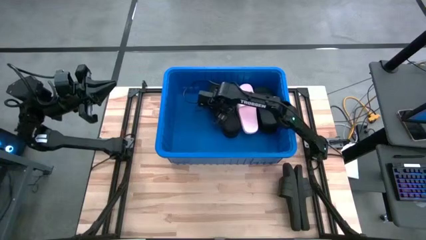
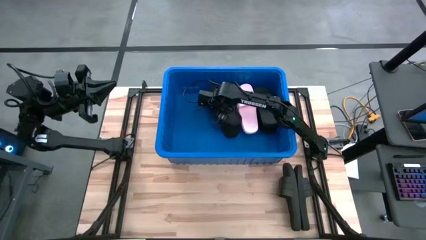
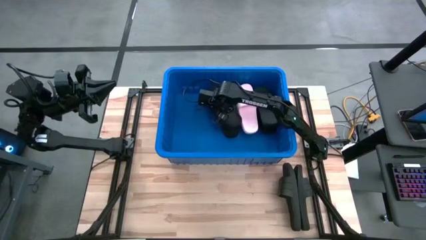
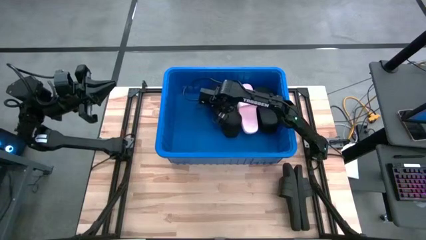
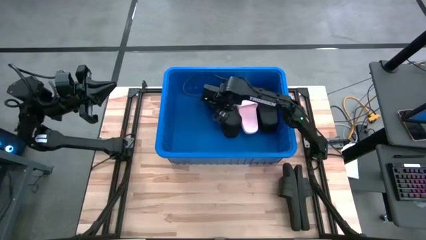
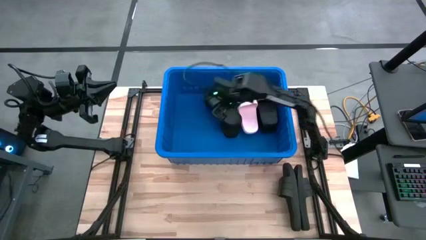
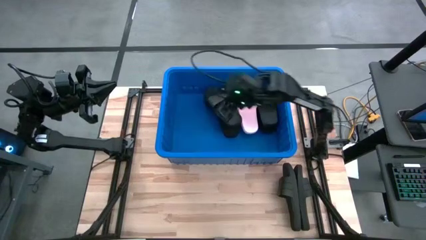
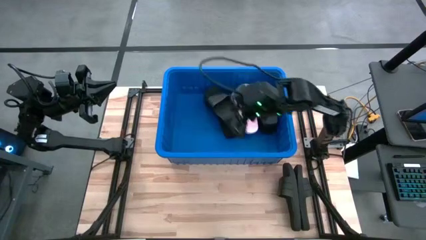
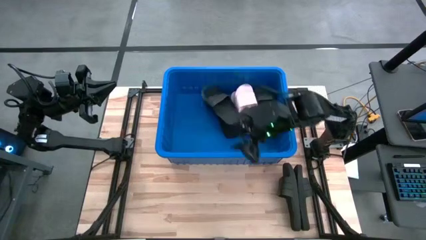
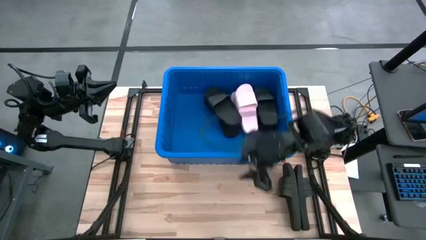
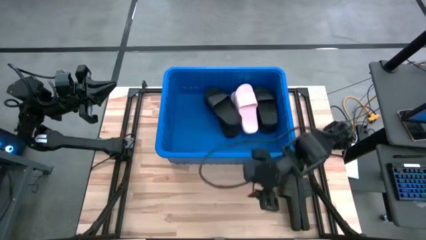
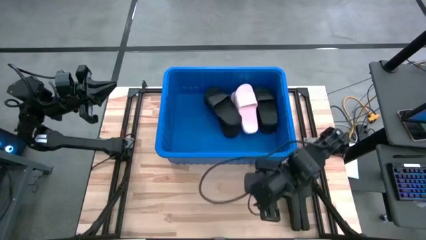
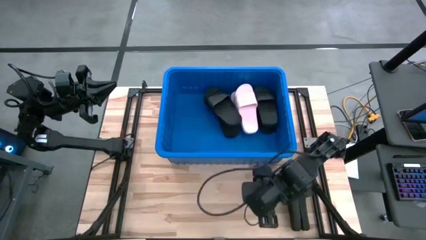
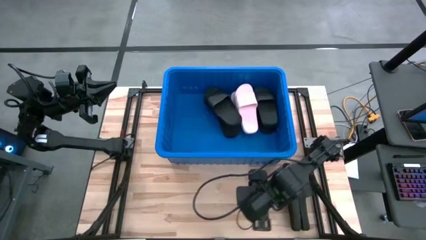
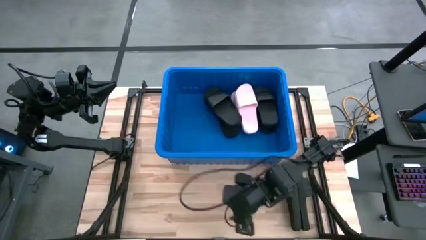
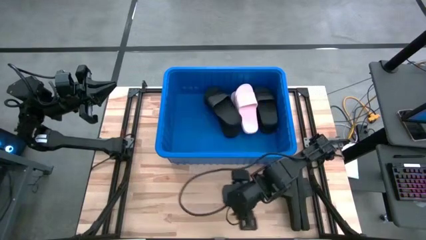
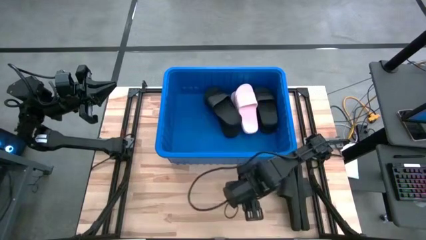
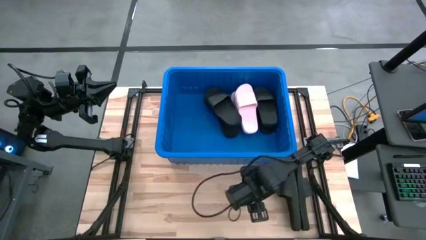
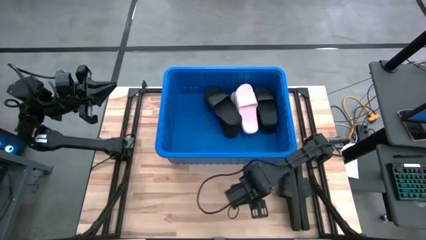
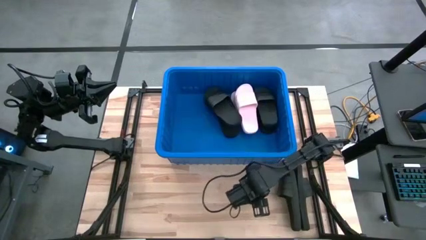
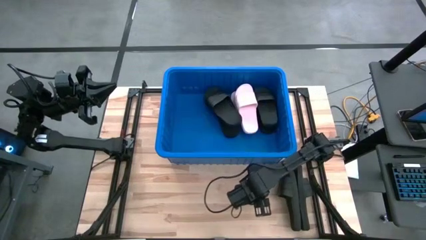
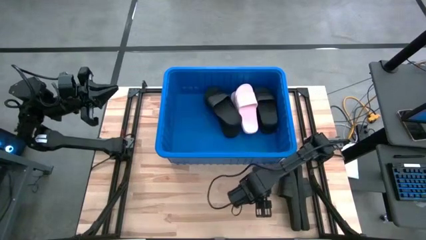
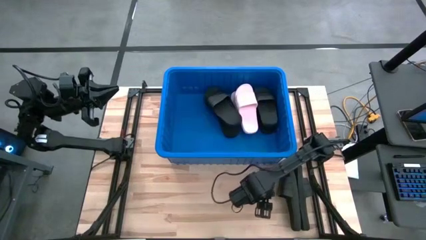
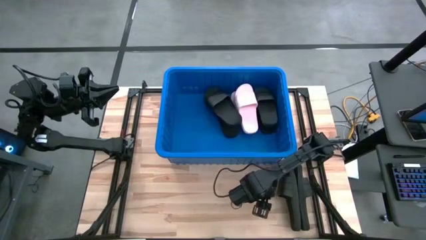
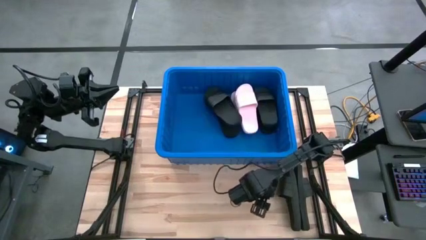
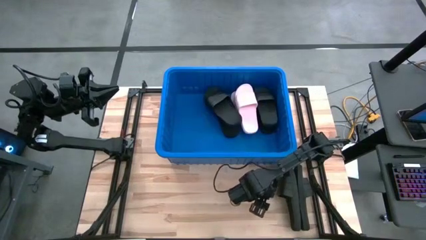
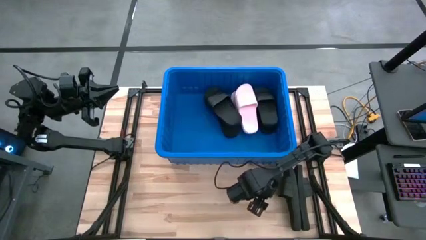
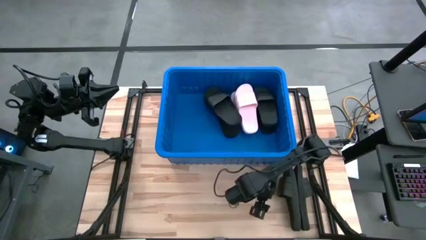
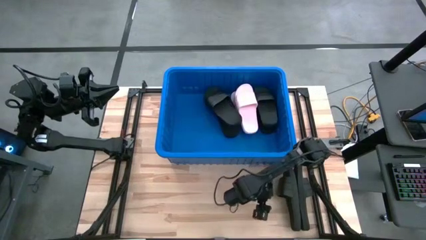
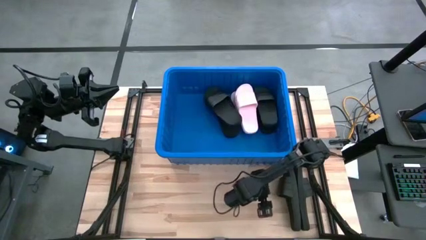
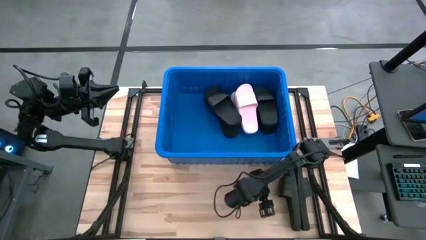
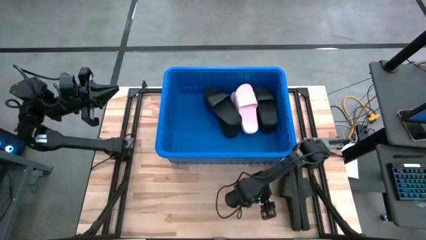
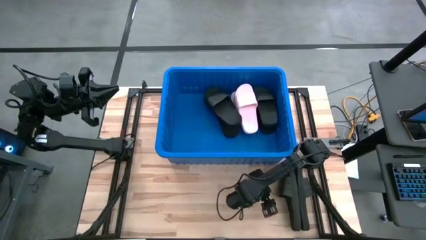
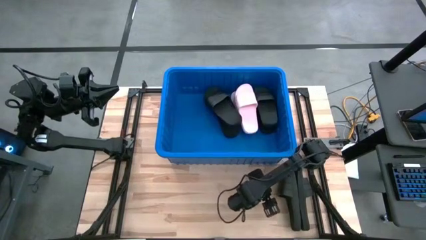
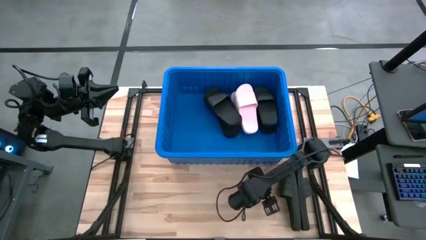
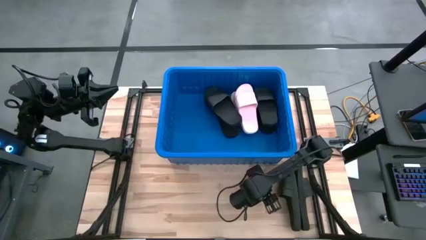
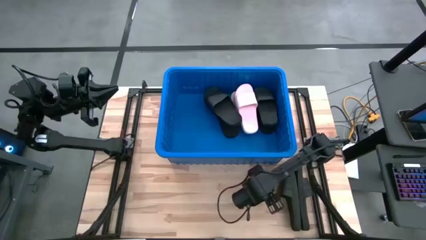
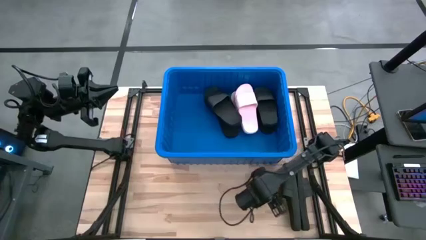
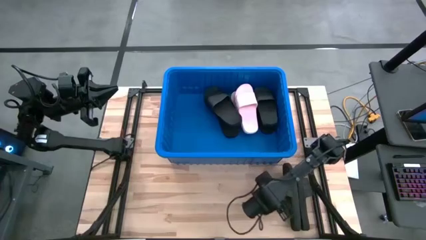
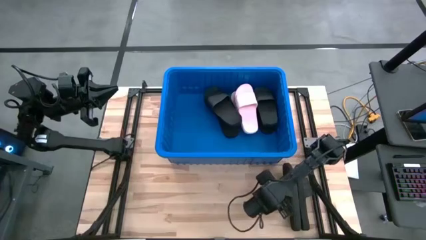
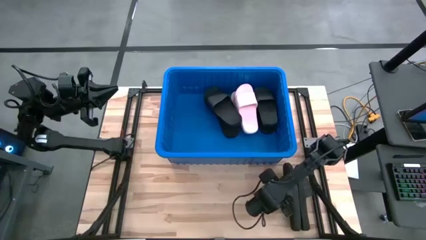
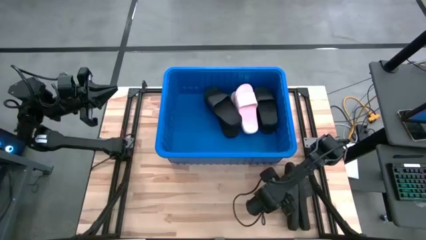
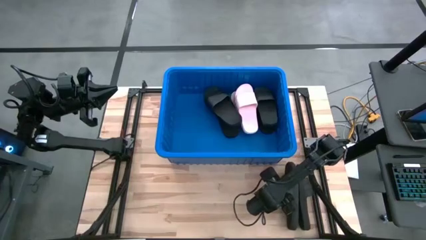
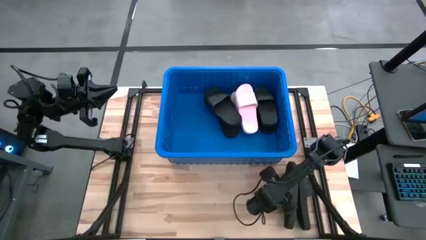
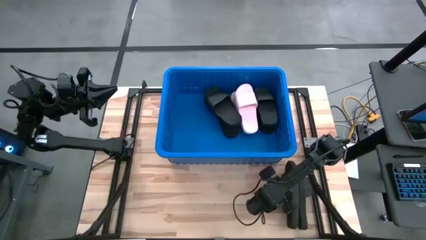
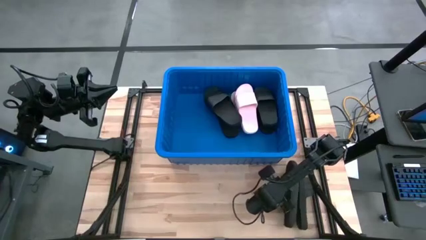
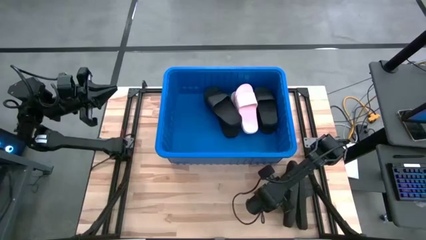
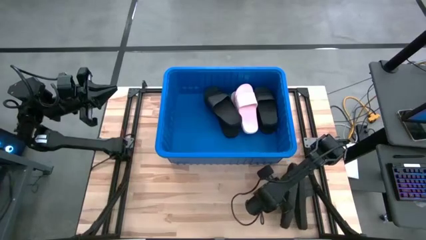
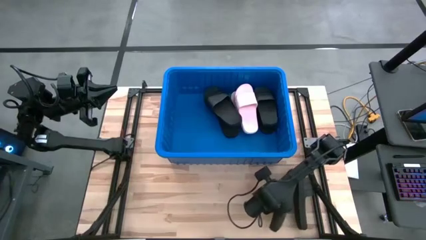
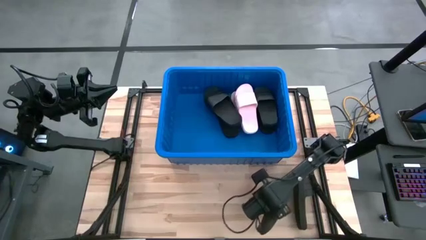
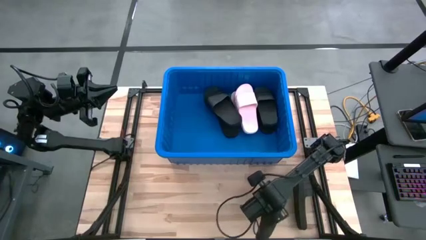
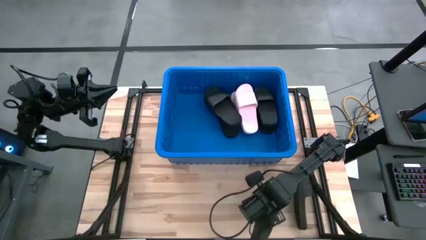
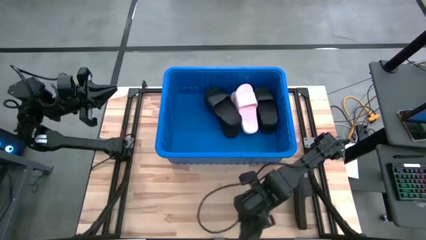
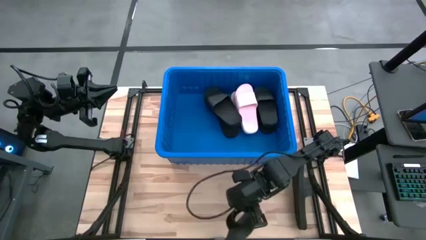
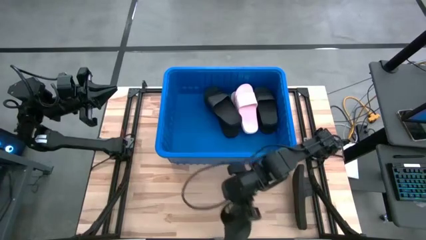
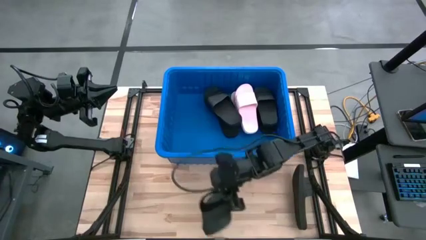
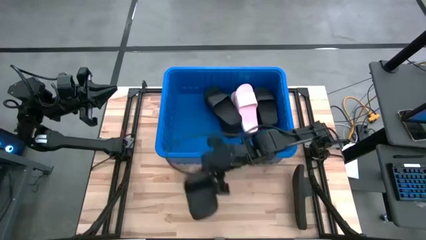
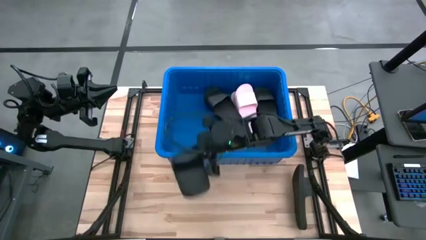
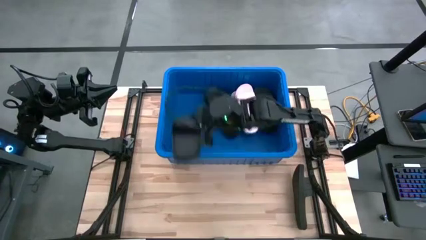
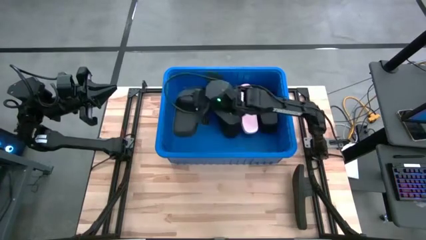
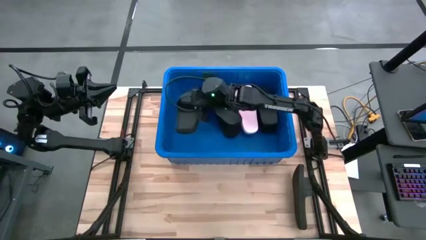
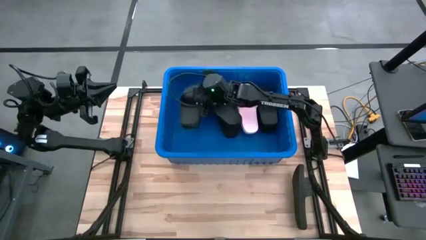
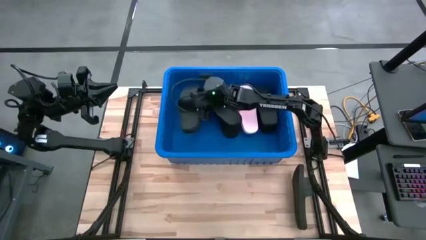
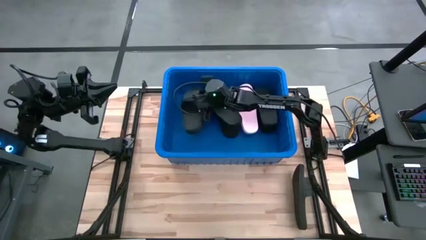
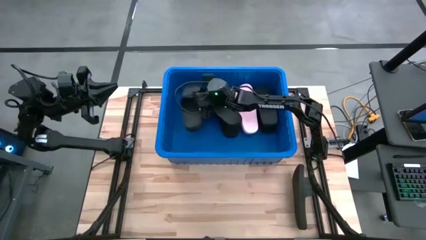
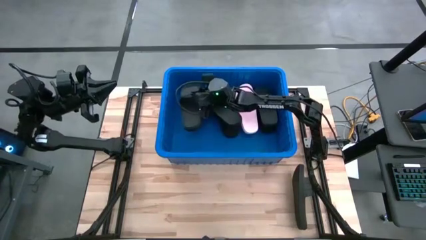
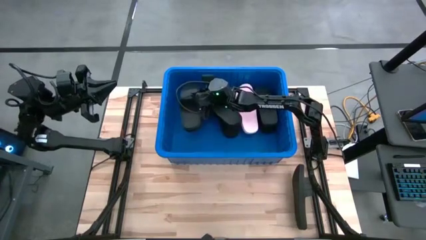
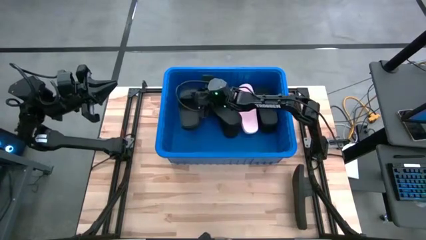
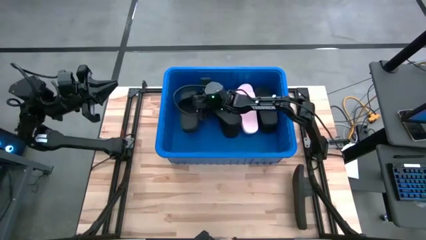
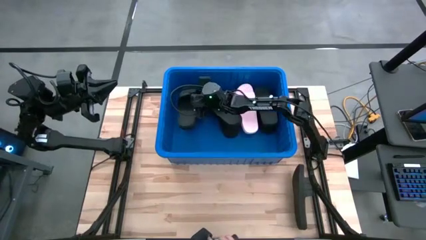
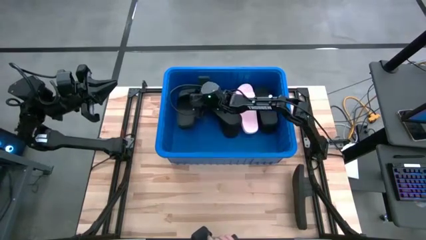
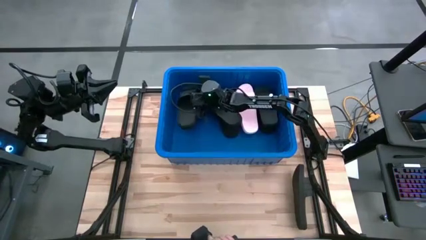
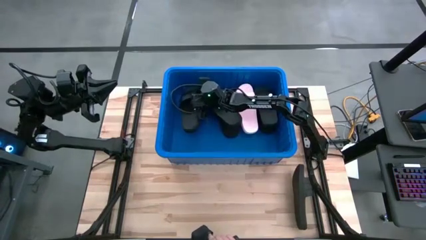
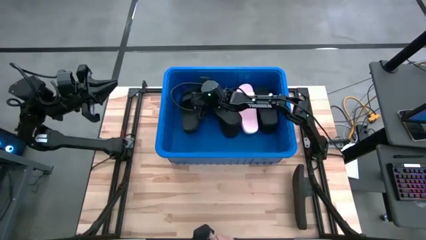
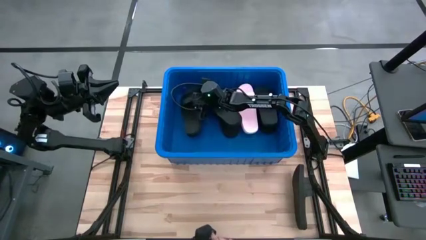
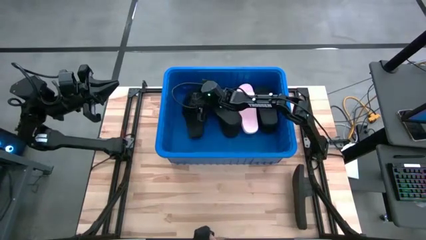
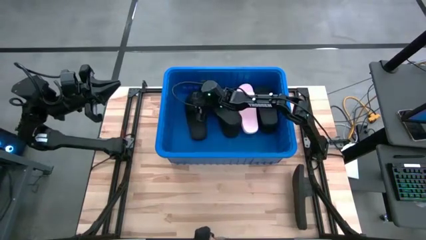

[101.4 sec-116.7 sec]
Task: Pick and place slides into bin
Put the black slide into the blue bin
